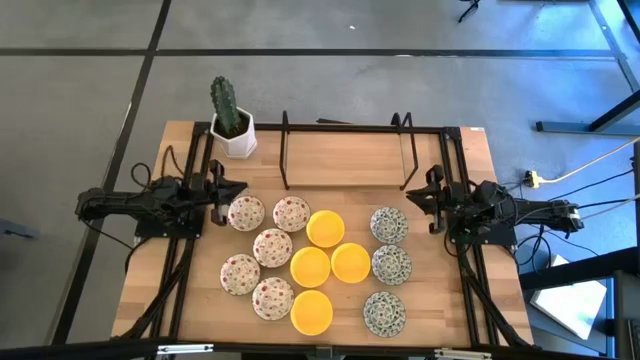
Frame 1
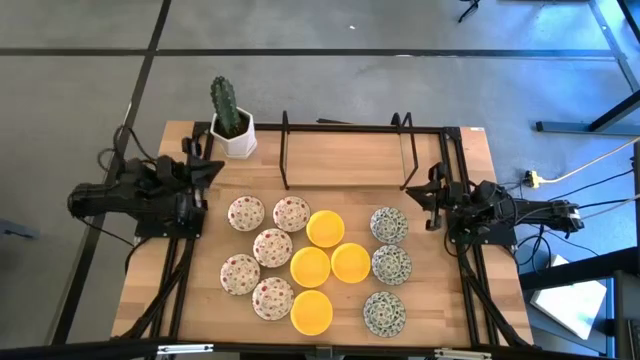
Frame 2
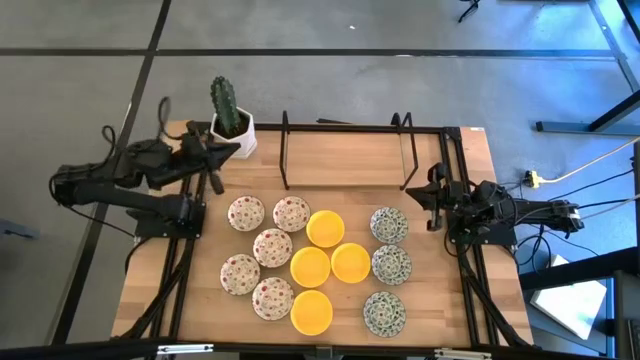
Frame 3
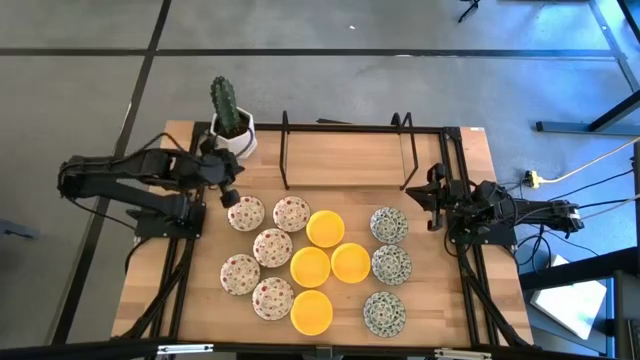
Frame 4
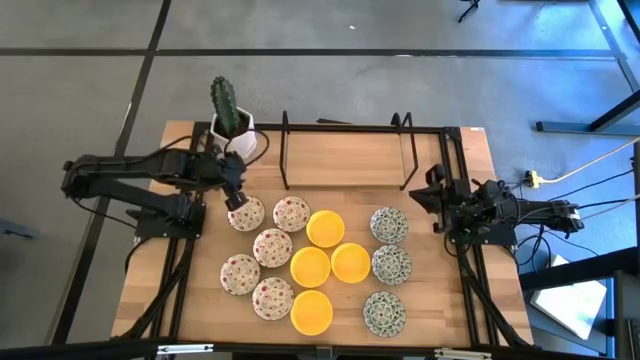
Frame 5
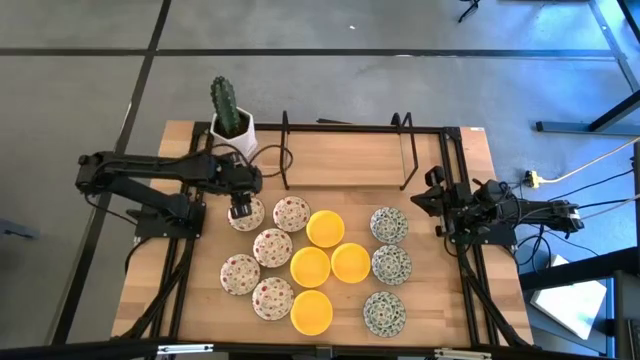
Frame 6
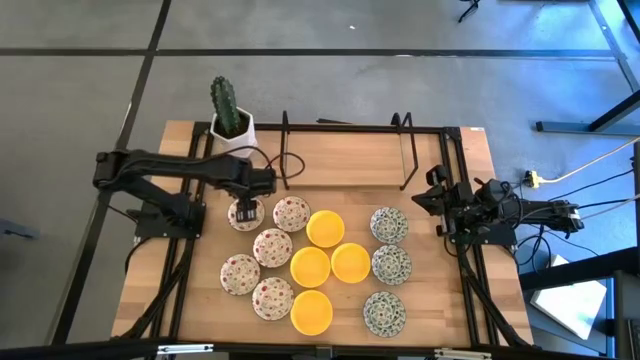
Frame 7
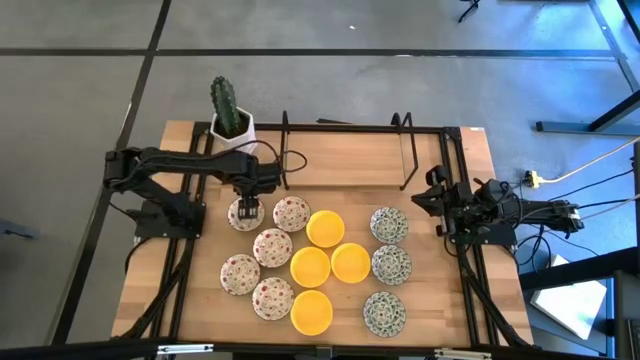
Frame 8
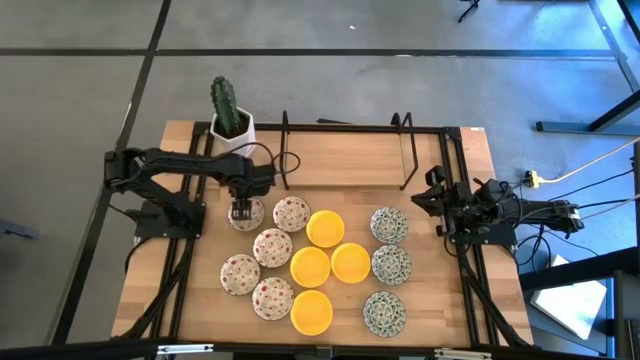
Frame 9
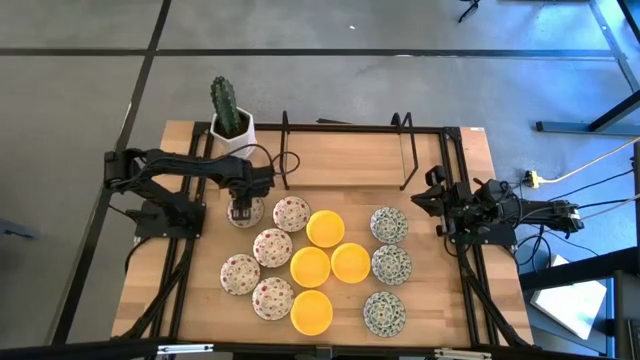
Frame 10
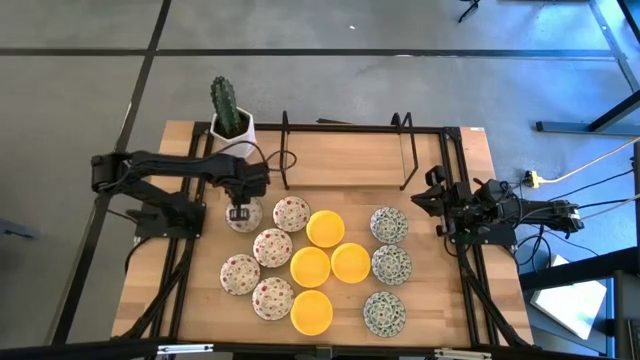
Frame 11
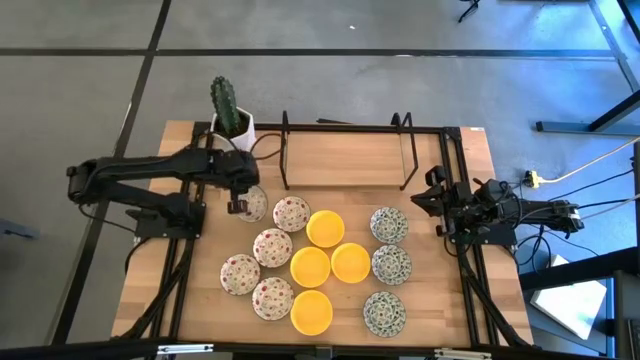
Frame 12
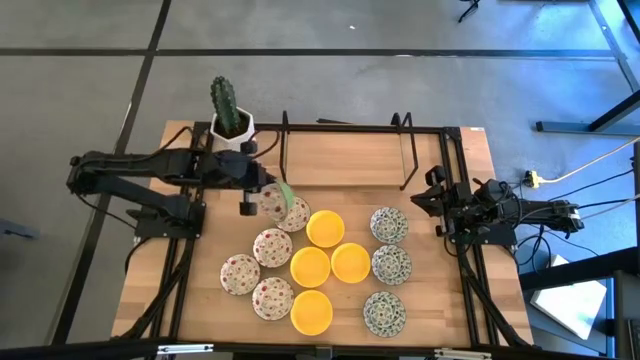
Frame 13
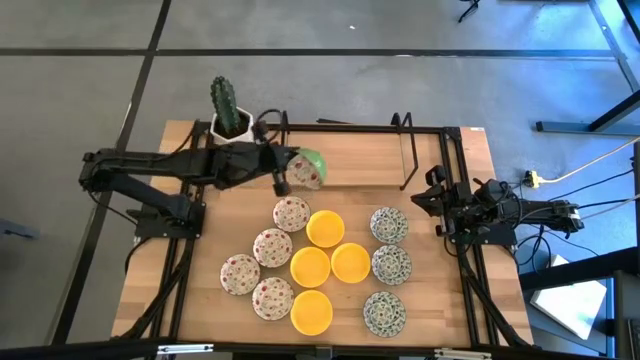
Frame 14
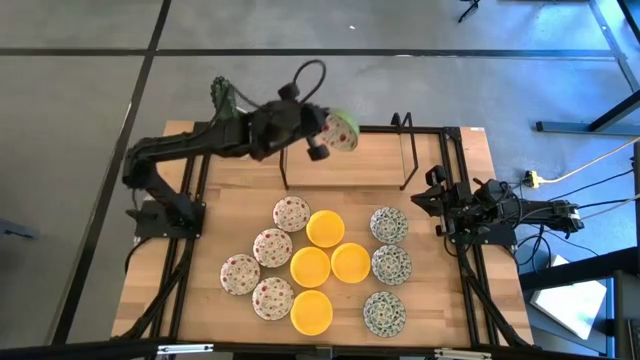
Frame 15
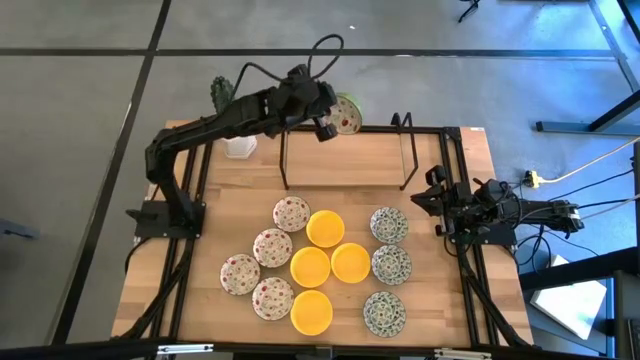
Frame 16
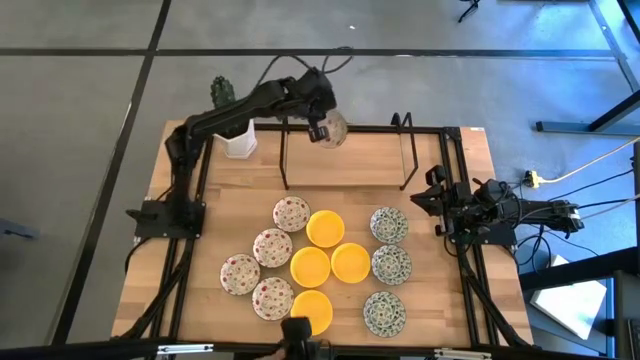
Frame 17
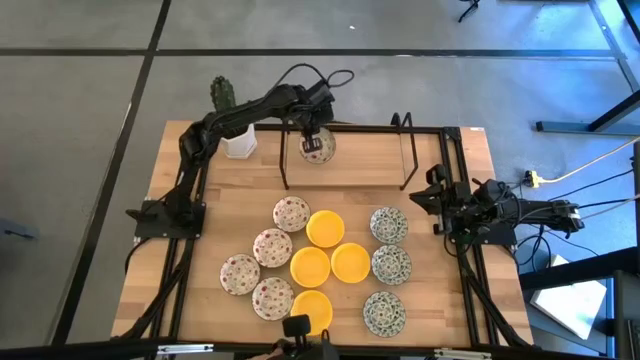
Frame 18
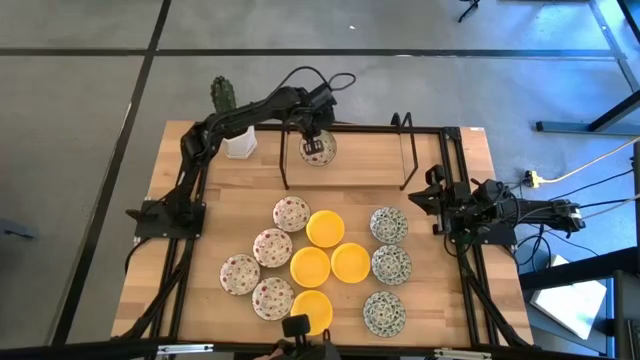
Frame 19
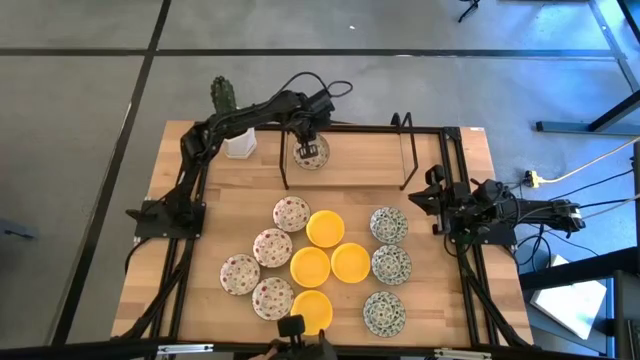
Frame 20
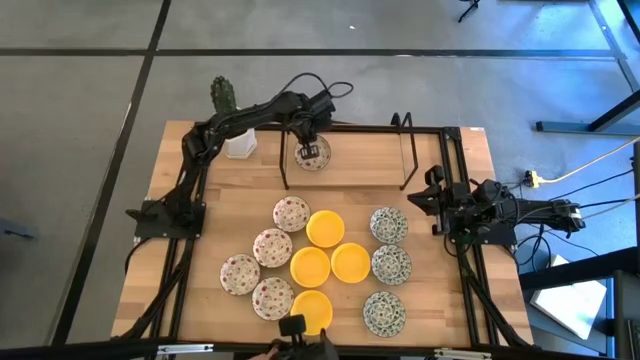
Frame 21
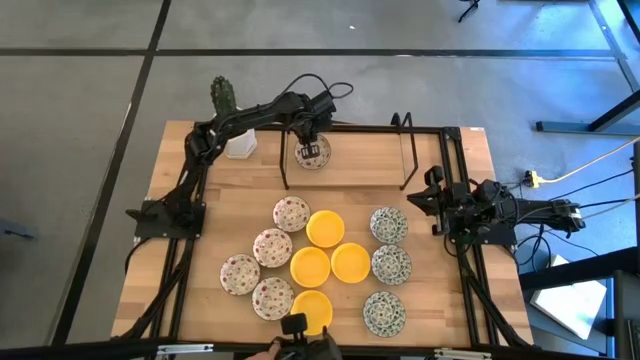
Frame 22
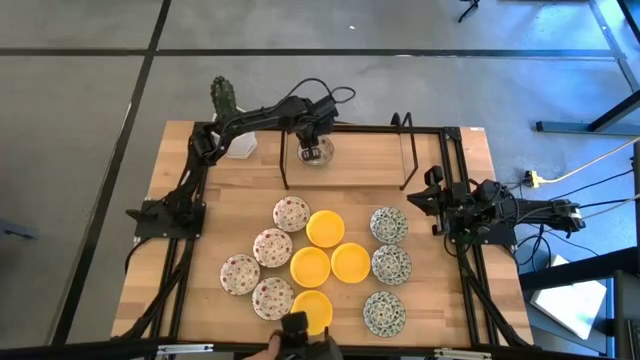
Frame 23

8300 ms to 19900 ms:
Task: Pick & Place Mini bowls
Put the green patterned bowl on the shelf

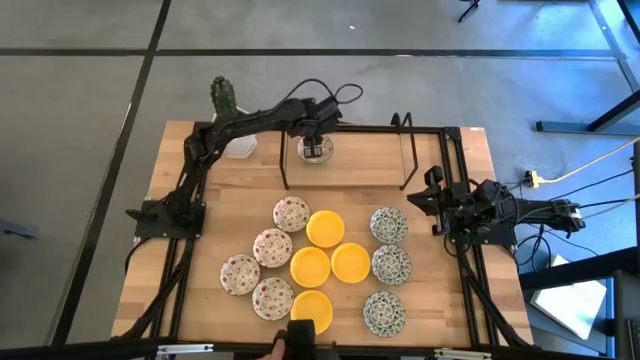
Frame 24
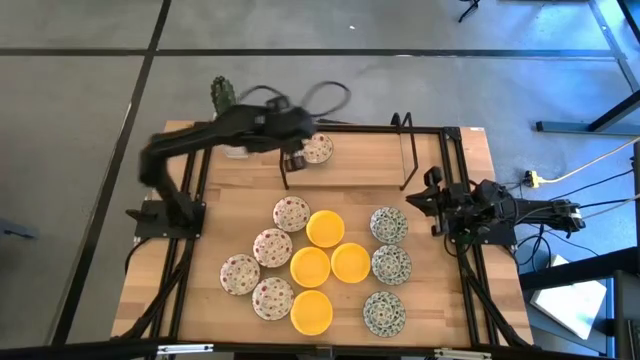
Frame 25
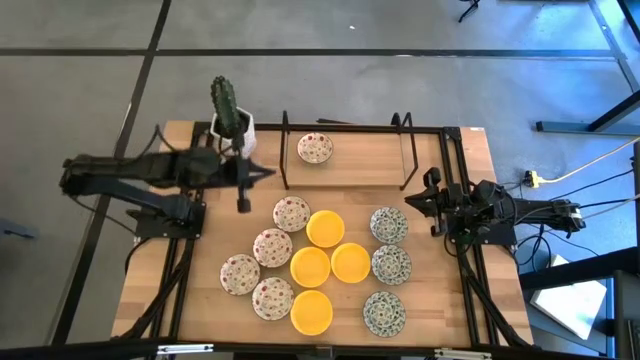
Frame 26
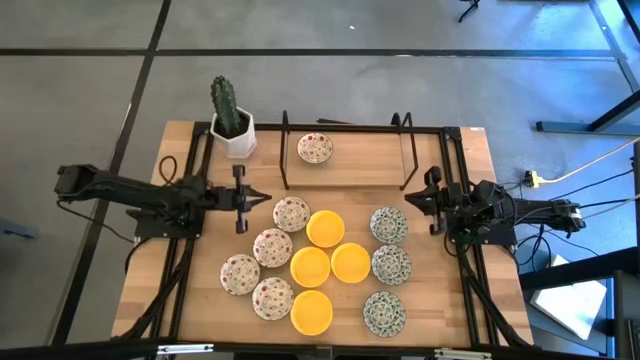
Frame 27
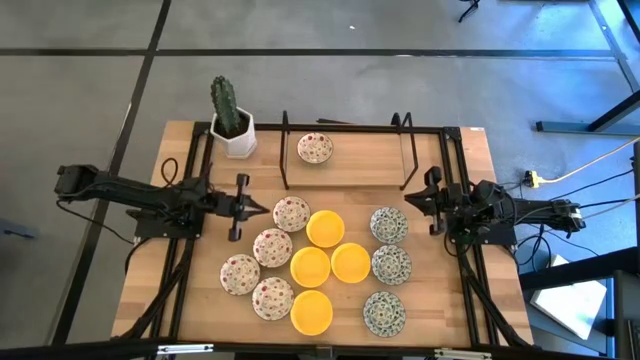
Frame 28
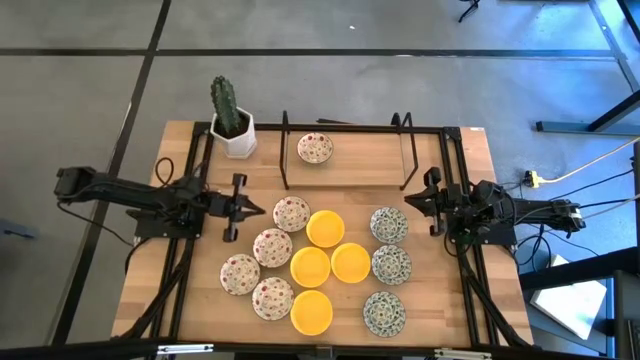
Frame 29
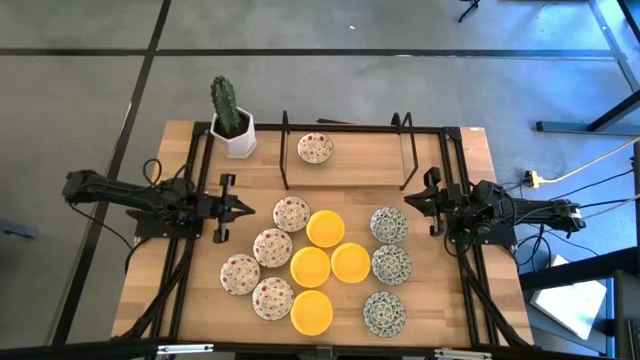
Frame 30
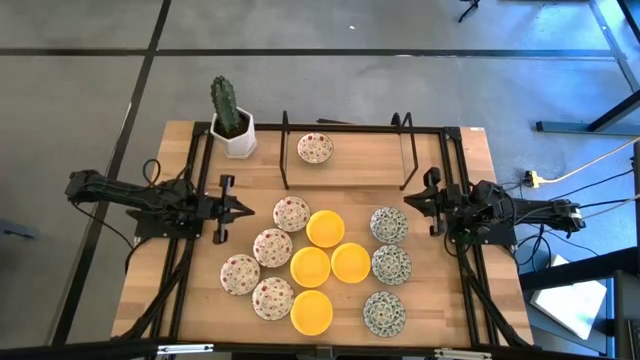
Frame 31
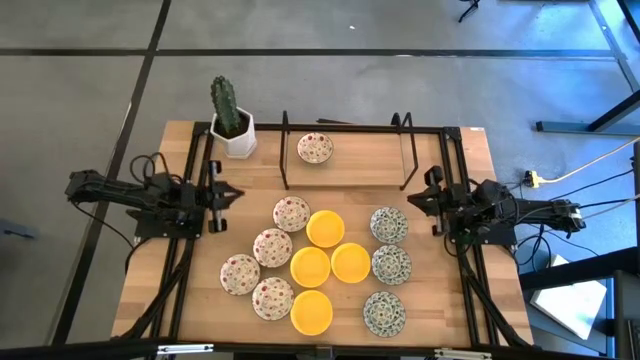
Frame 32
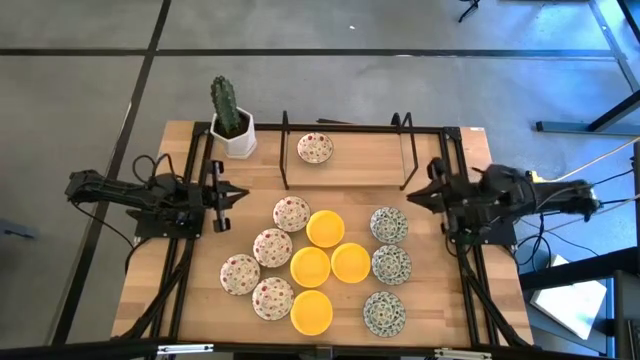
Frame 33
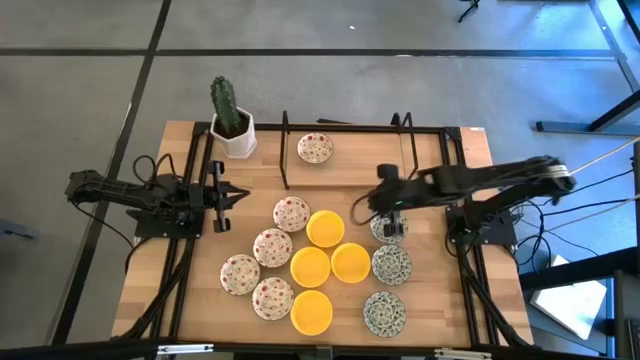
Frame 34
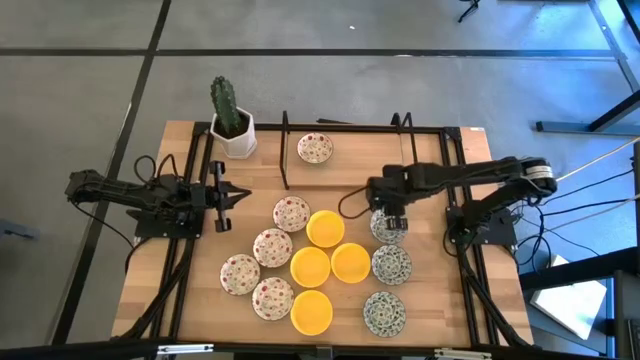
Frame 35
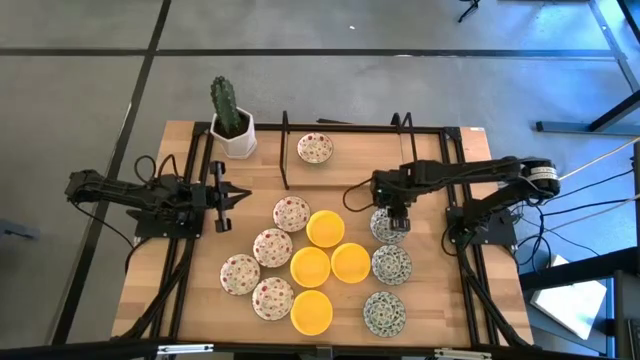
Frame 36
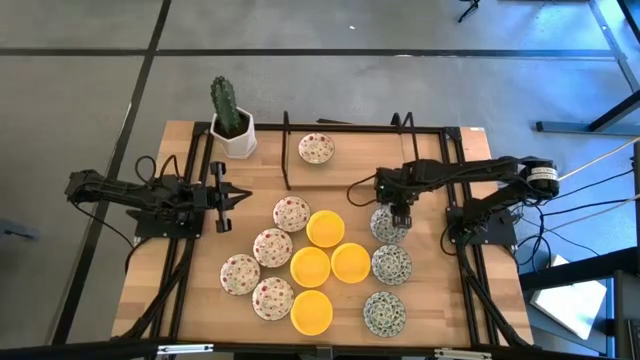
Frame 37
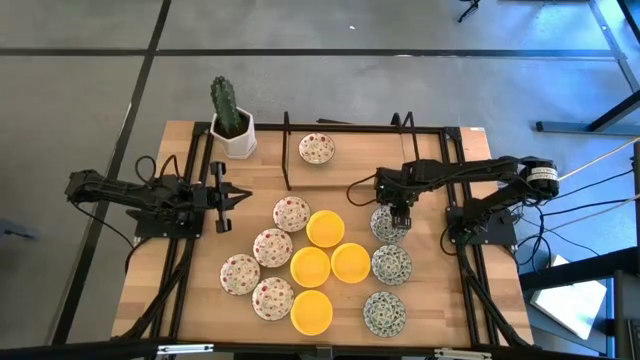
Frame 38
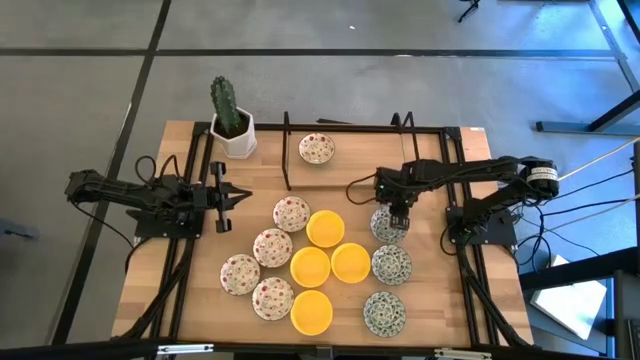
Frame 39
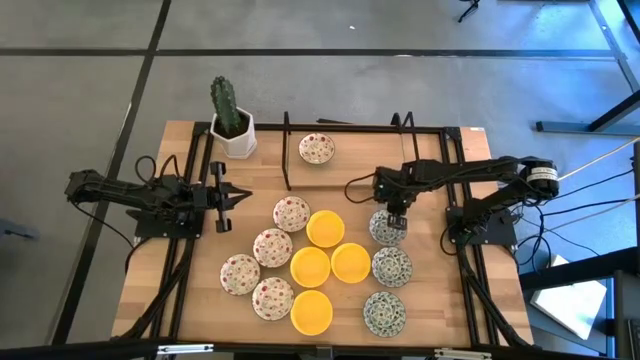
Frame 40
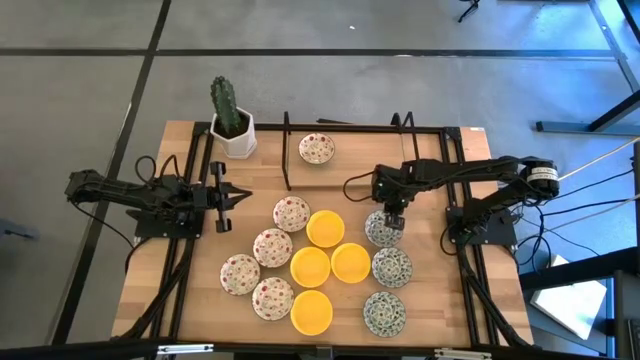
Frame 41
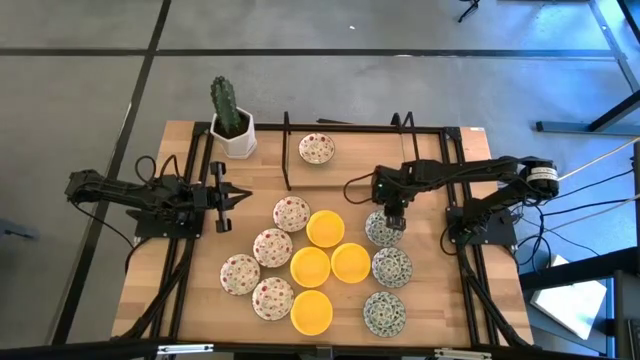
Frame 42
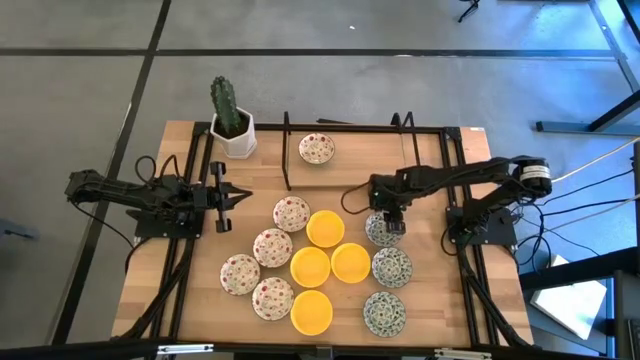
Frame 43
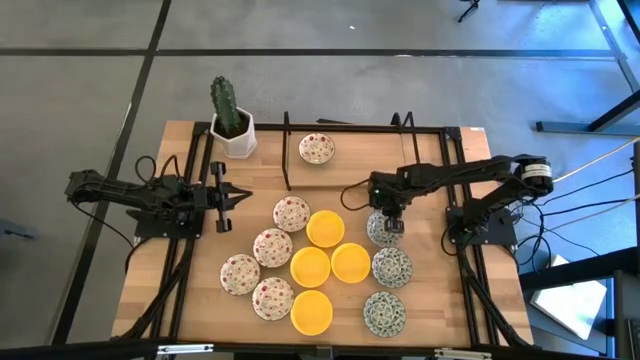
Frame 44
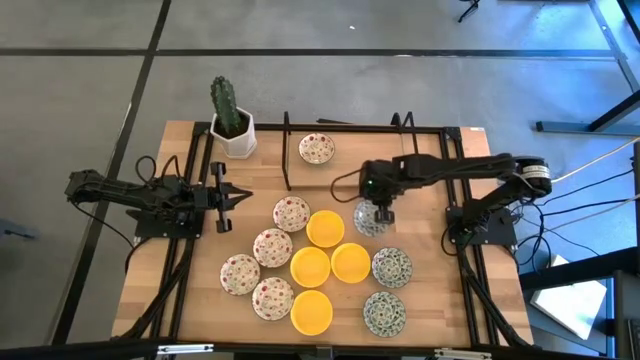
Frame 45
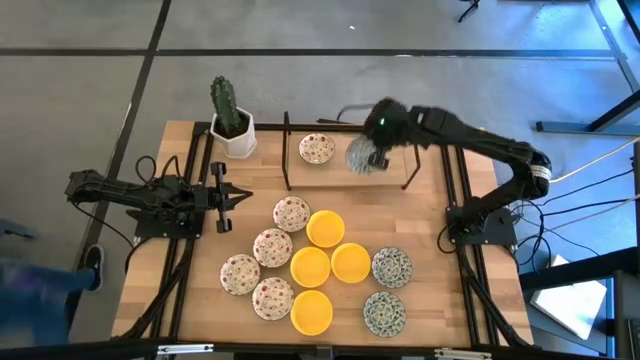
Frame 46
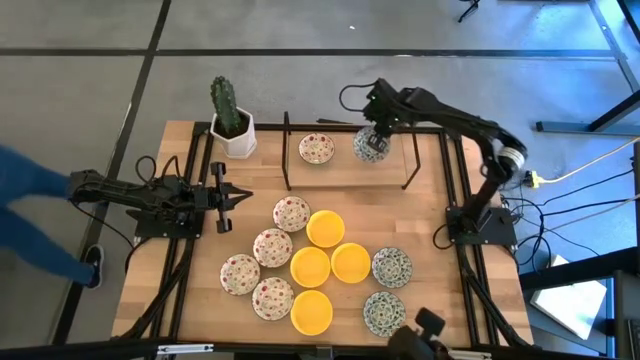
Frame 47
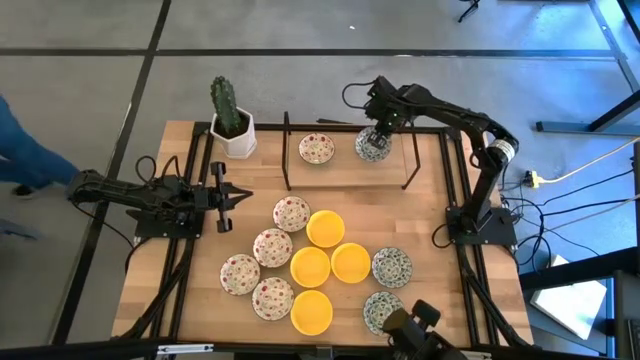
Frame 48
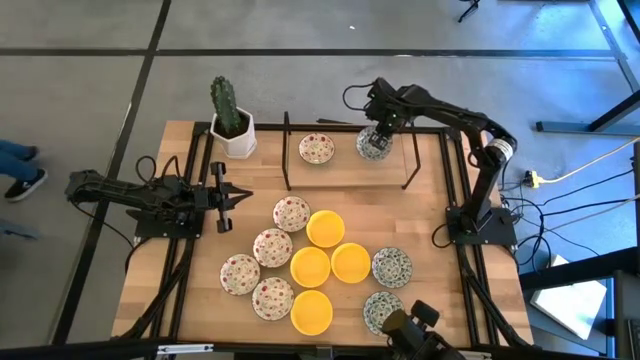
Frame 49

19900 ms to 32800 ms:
Put the blue patterned bowl on the shelf
